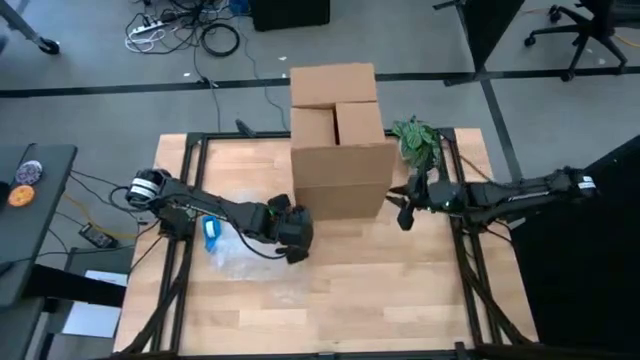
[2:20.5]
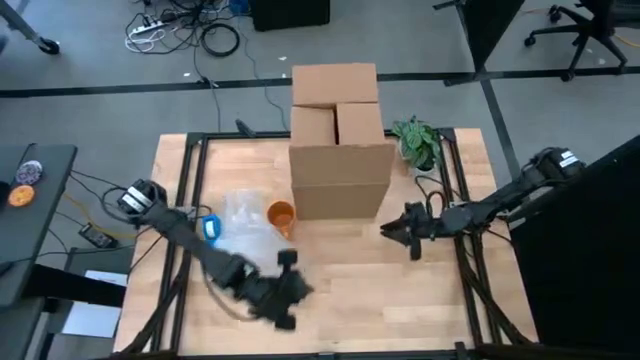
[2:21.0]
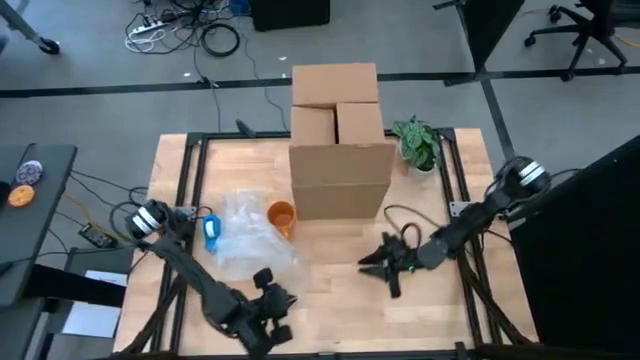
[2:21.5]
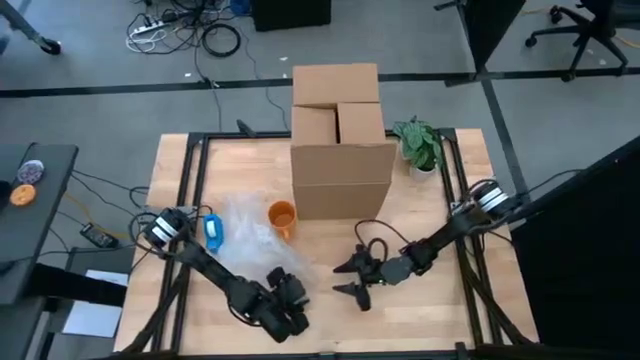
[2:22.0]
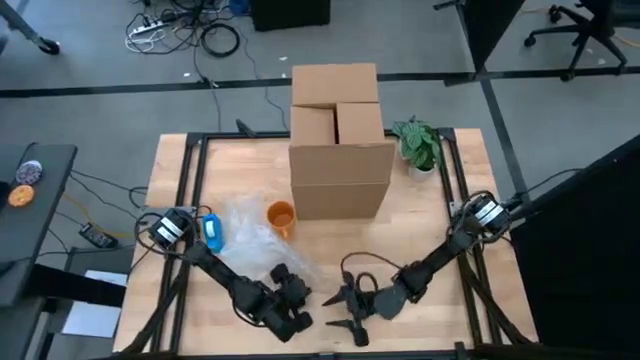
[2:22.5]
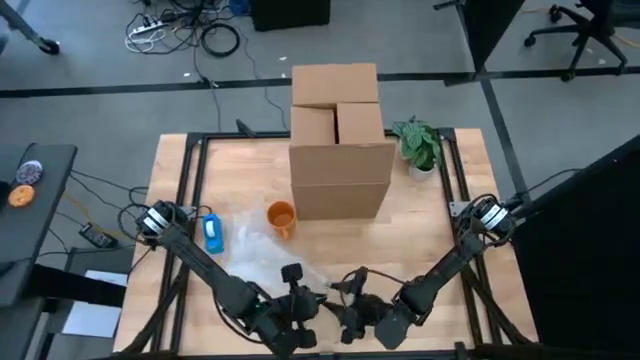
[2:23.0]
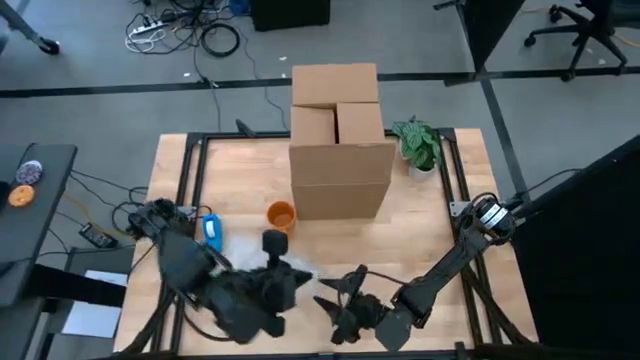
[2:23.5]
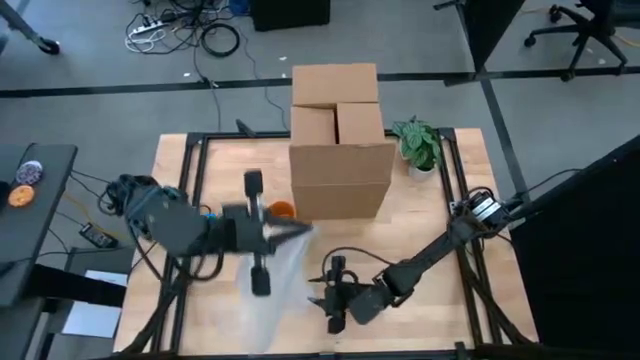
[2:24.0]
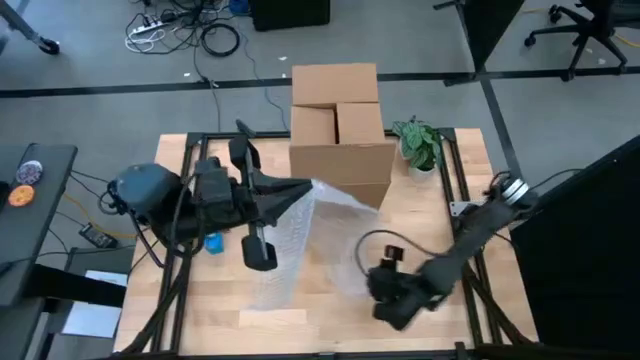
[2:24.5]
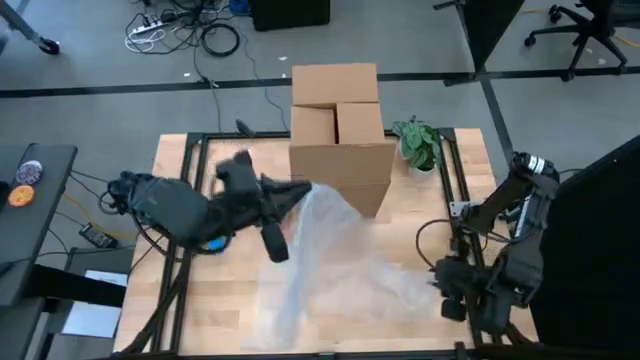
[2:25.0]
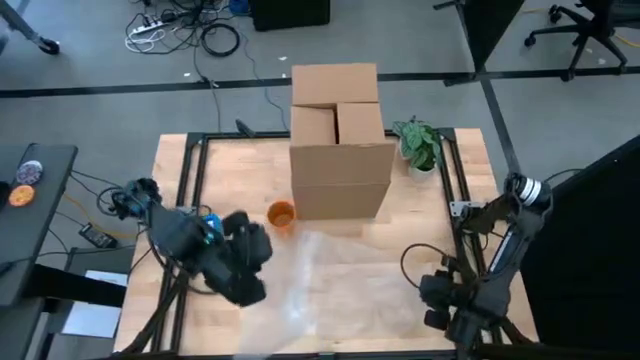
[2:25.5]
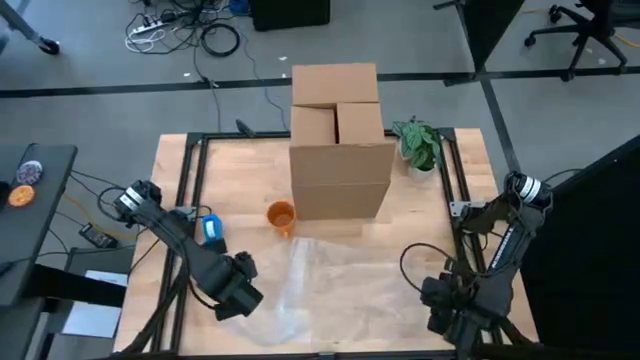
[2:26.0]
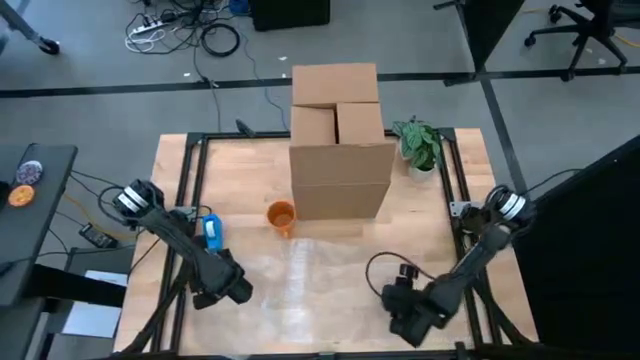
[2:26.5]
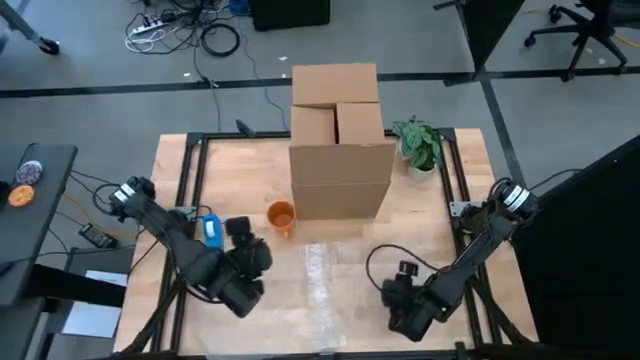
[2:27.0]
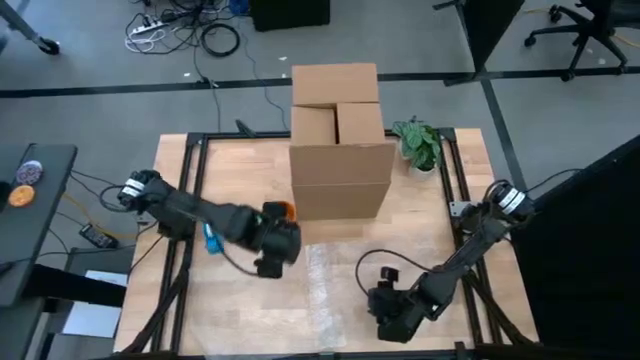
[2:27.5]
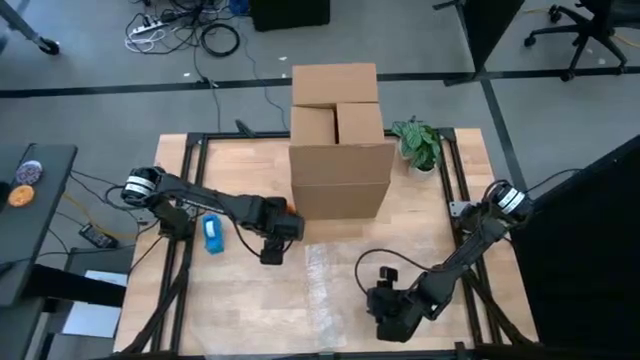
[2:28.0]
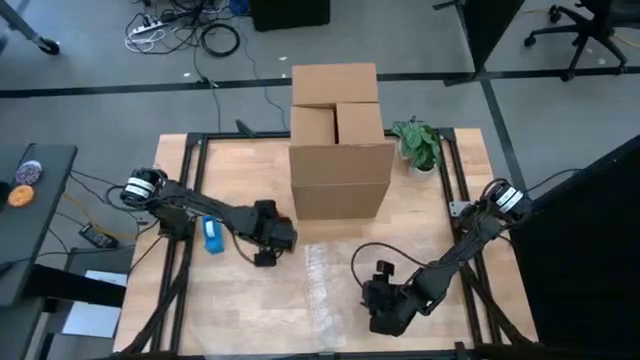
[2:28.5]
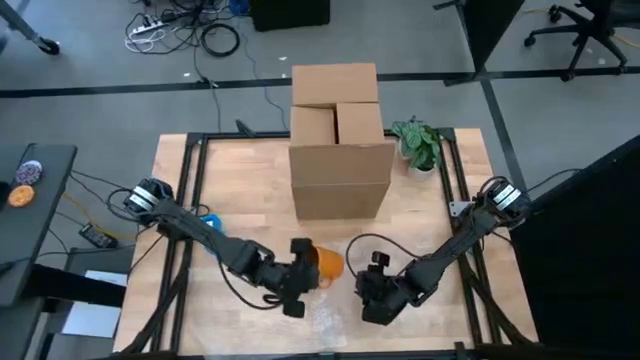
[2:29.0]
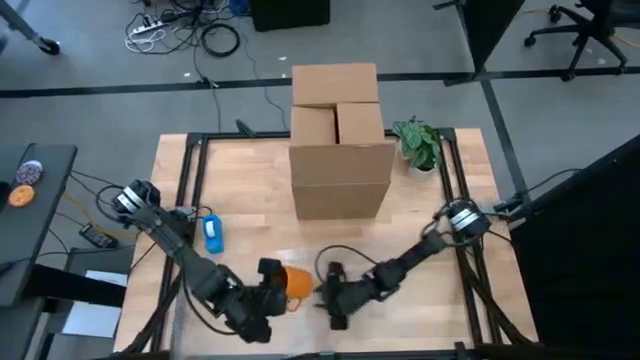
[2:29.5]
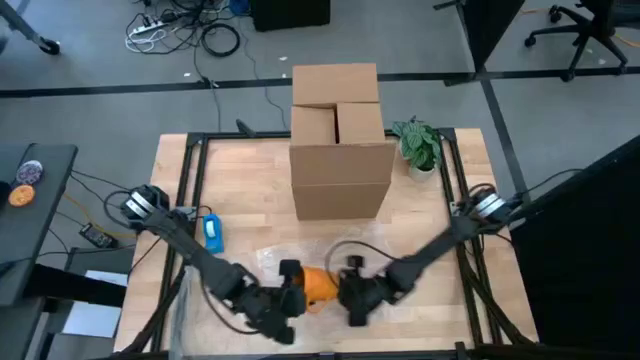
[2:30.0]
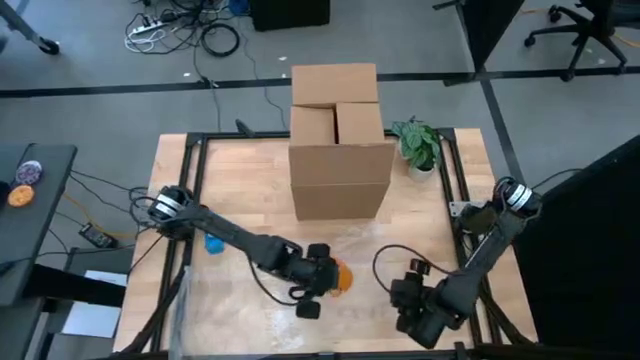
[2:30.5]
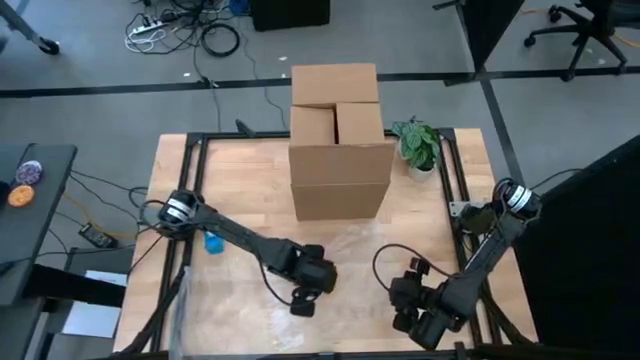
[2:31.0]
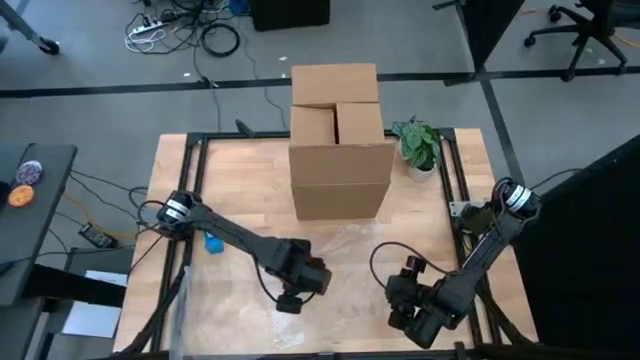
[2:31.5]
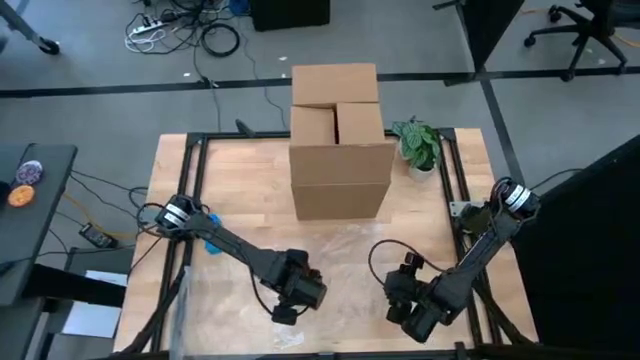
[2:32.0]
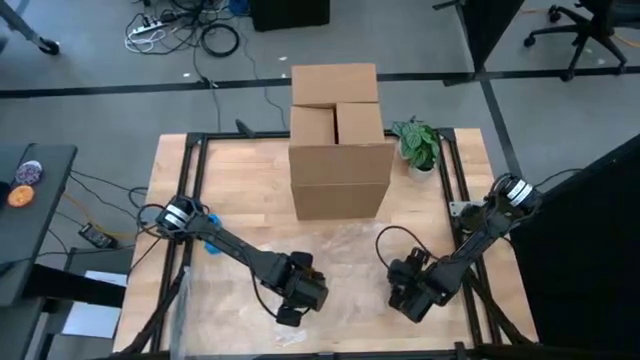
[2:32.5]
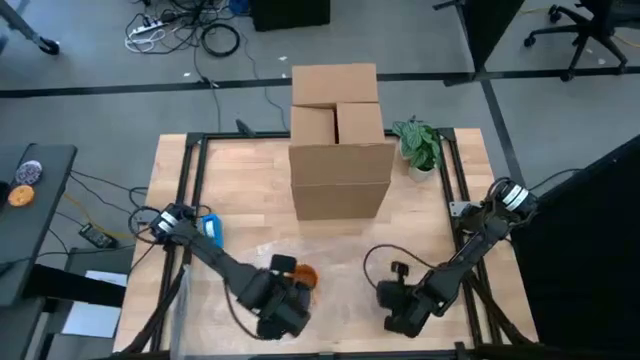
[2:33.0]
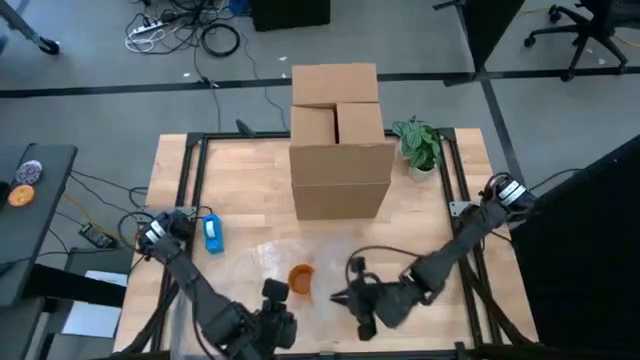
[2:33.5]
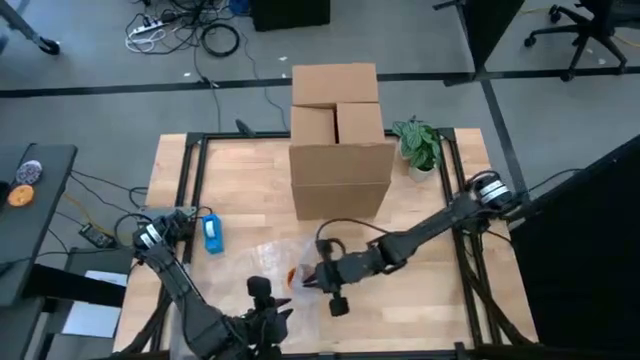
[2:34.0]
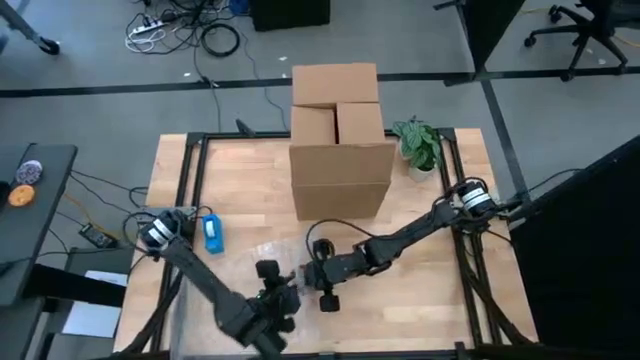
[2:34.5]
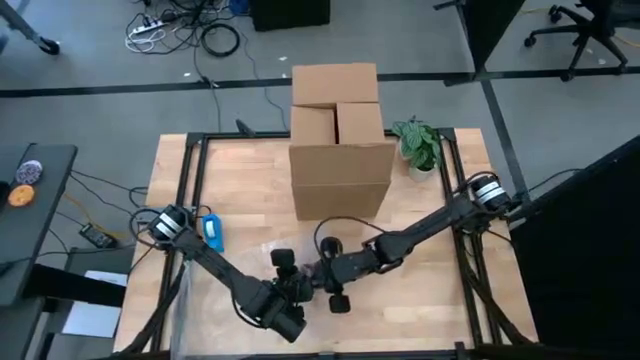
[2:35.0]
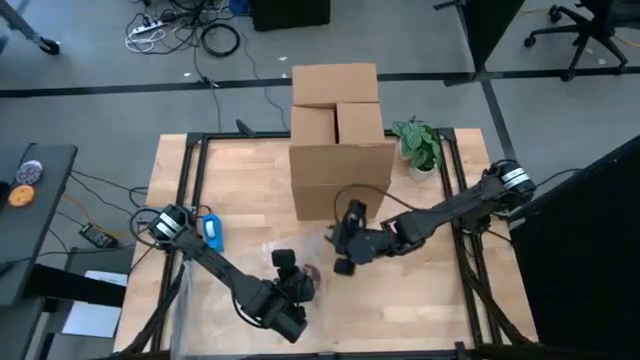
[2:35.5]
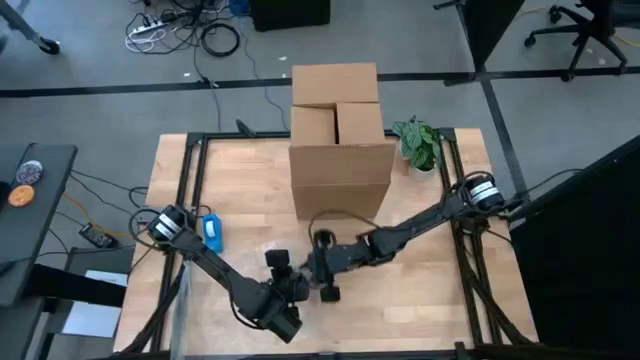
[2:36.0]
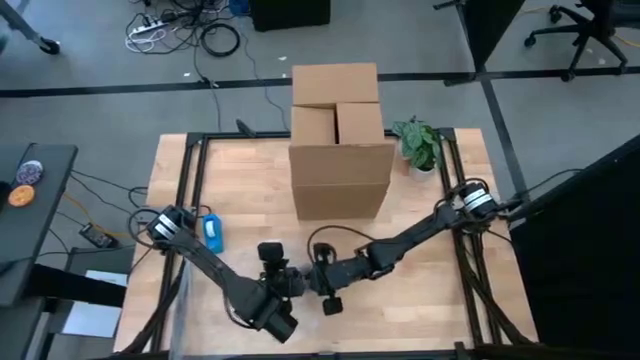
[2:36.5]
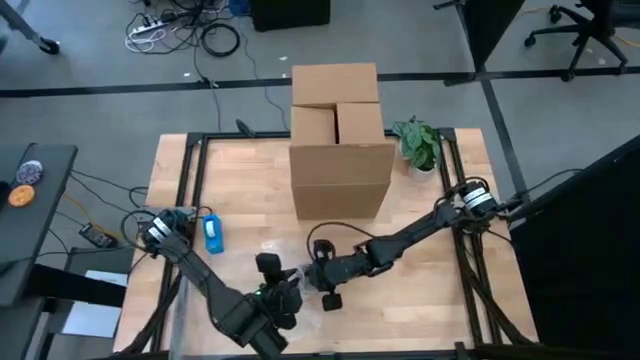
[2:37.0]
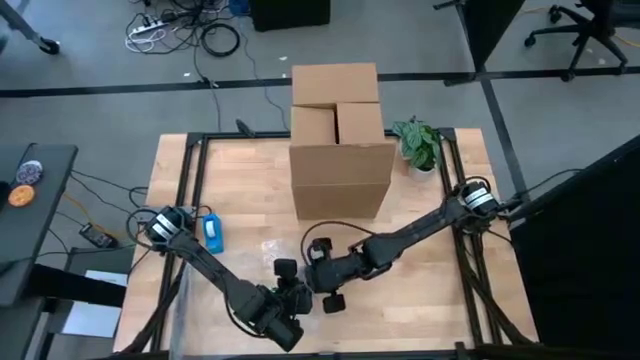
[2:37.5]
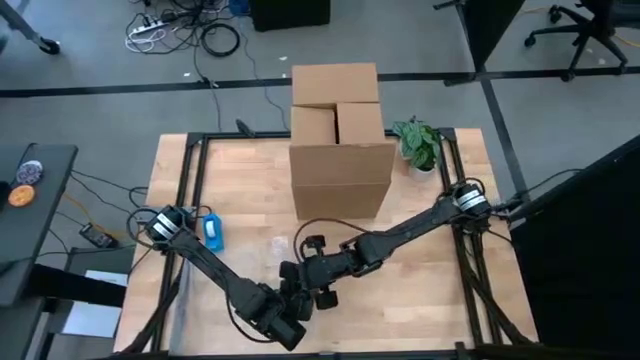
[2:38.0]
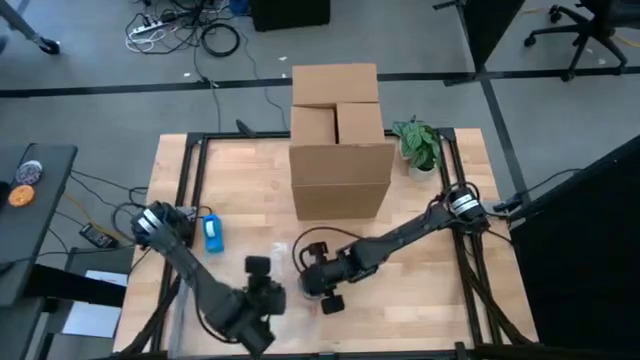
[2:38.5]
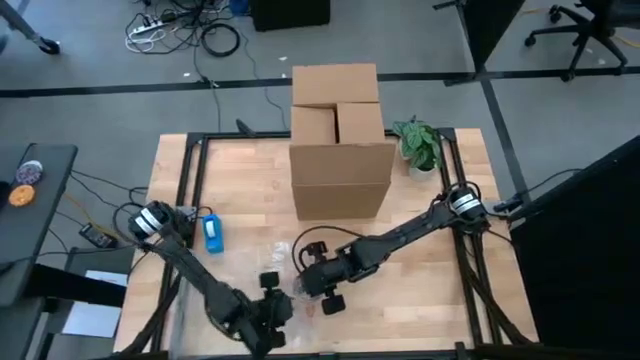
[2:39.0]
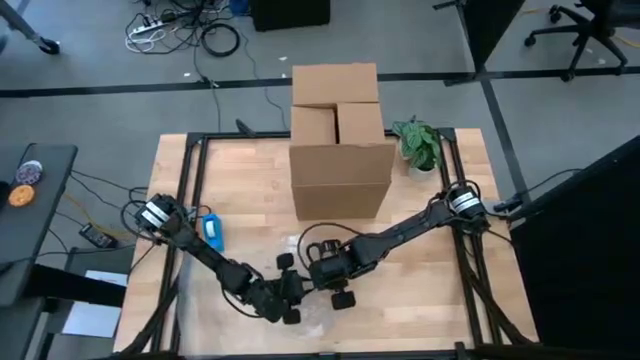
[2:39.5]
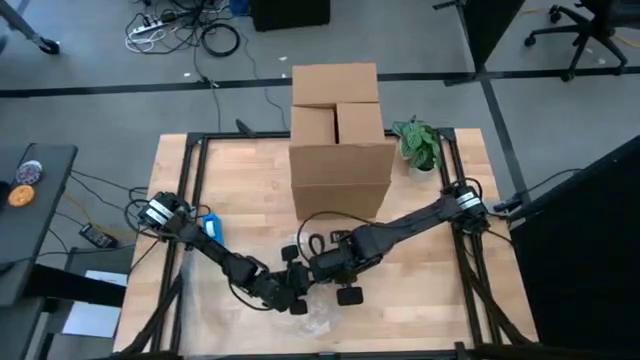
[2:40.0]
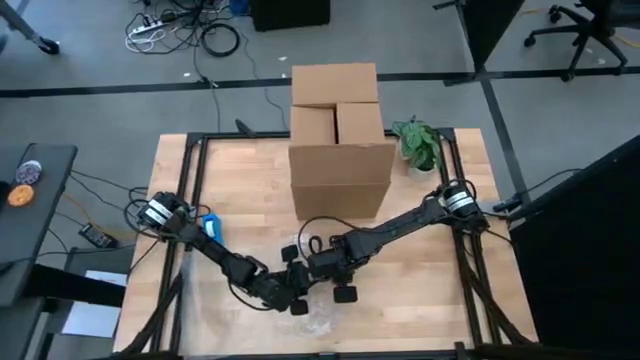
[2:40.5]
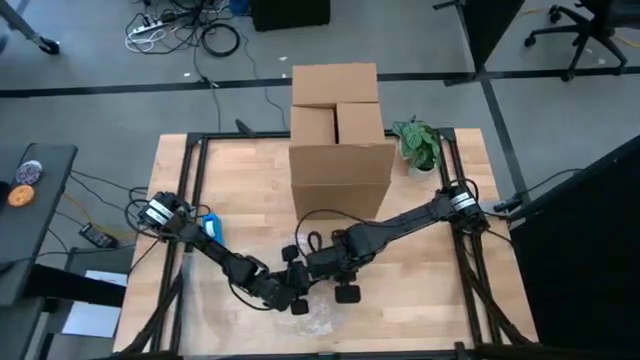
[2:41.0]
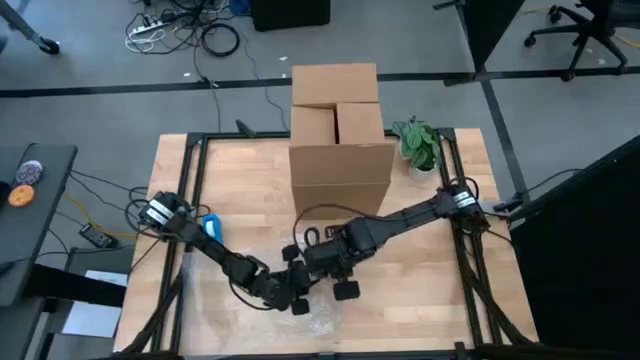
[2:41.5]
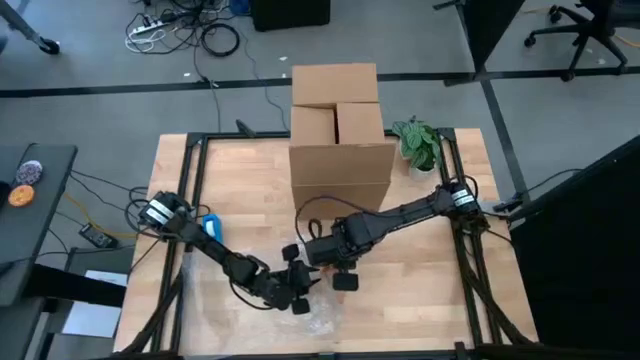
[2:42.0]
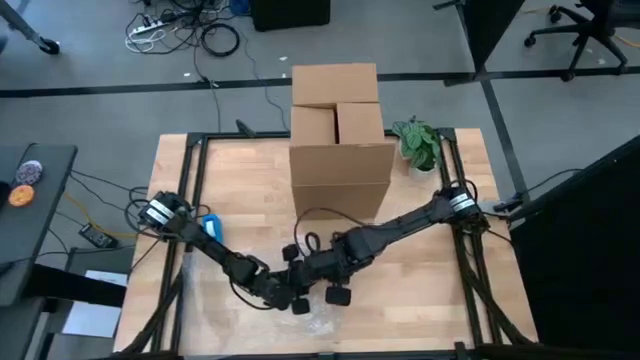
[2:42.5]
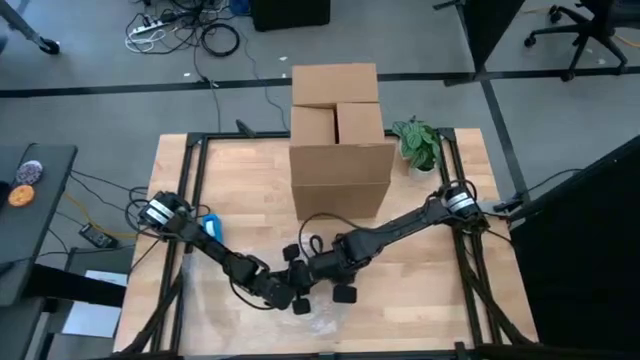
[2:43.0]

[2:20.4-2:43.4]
Task: wrap mug
Wrap the orange mug using the transparent bubble wrap
